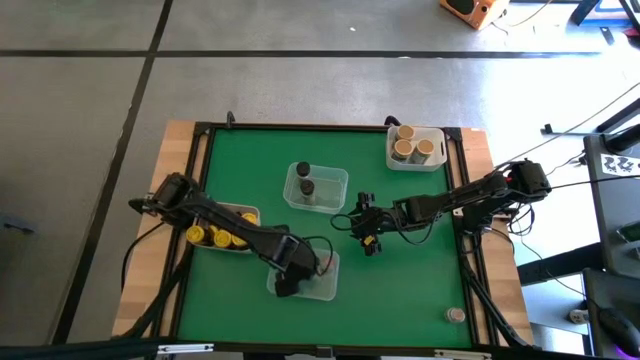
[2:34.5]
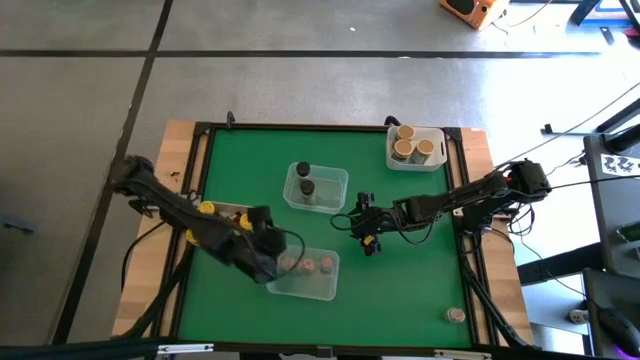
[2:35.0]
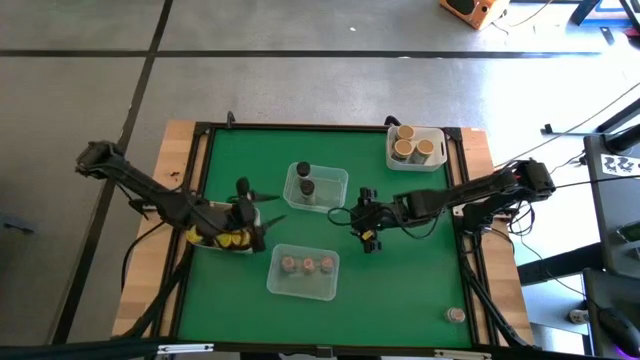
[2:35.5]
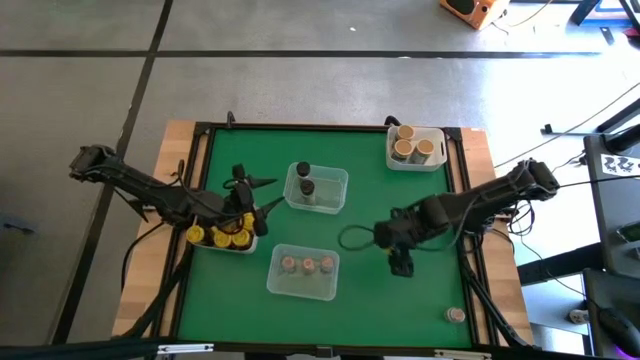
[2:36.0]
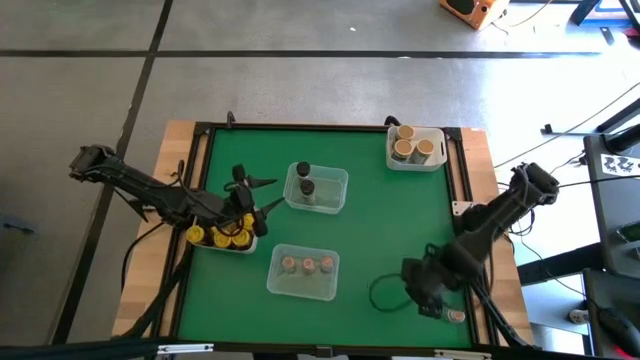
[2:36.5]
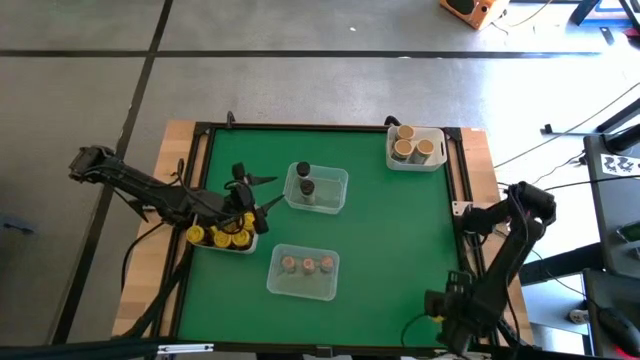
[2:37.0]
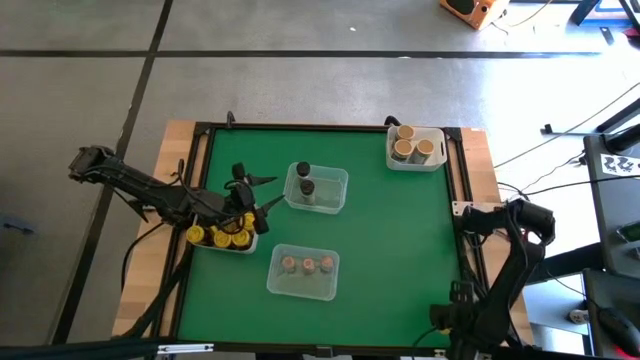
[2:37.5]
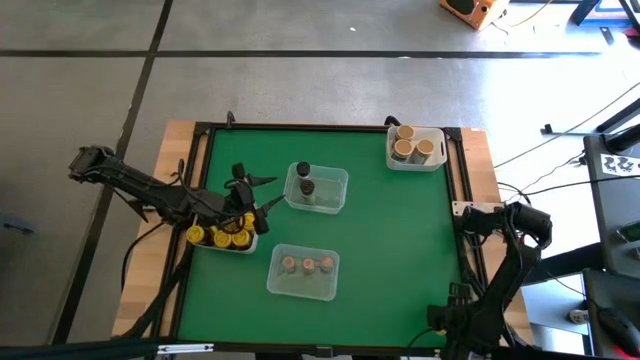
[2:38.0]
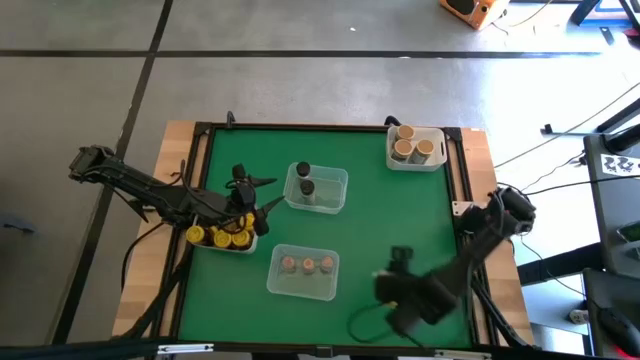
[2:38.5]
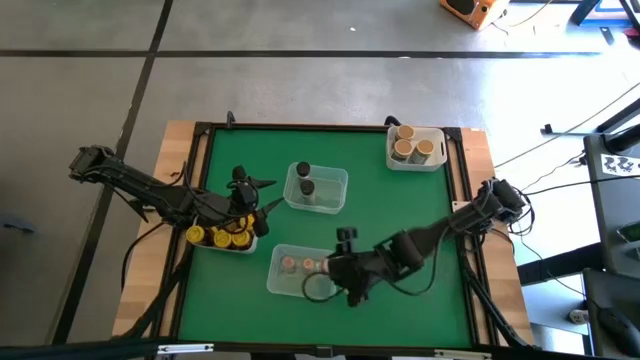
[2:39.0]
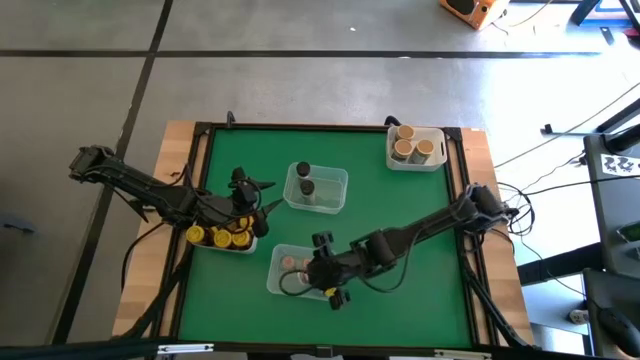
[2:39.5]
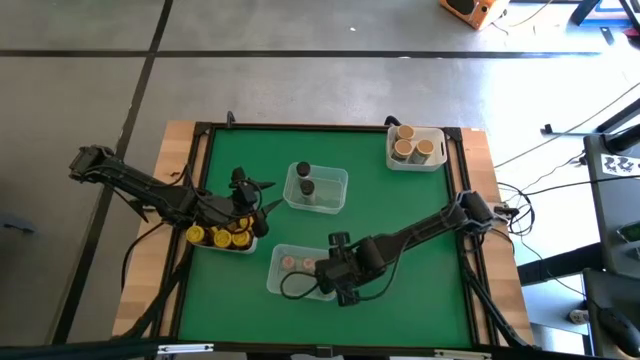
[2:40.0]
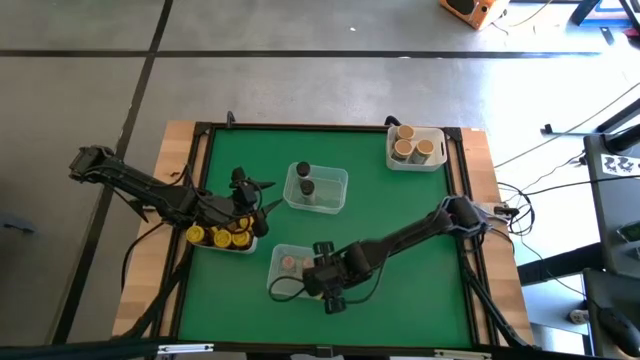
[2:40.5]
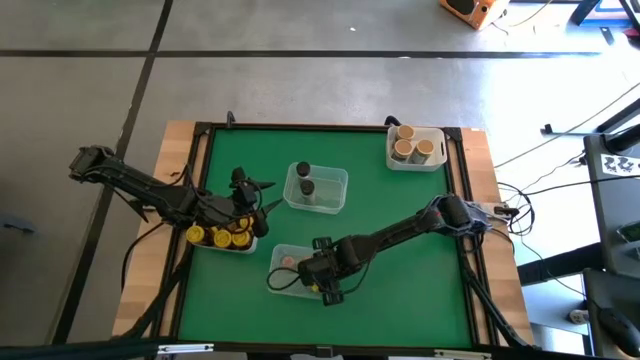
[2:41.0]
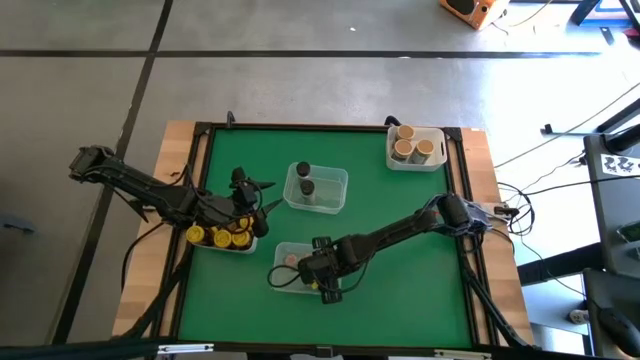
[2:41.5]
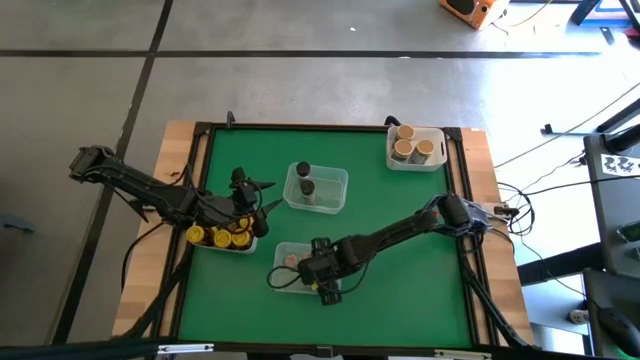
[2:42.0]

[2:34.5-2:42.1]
Task: Sort spices by type
Put the brown spice bottle into the bottom transparent bin

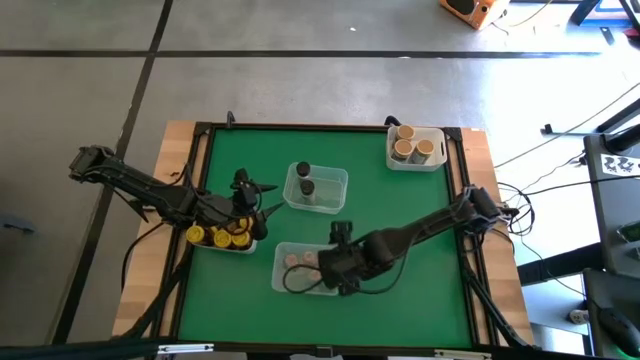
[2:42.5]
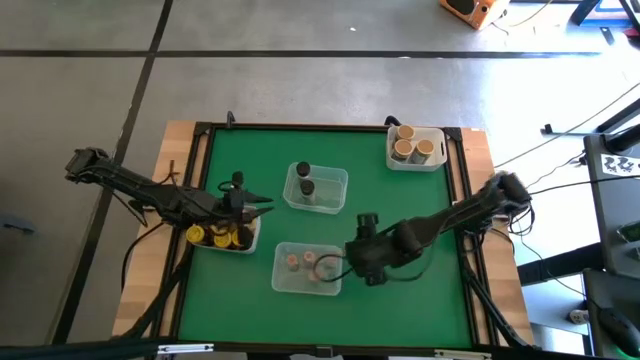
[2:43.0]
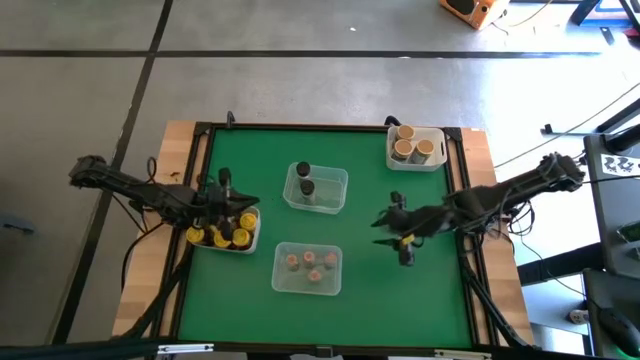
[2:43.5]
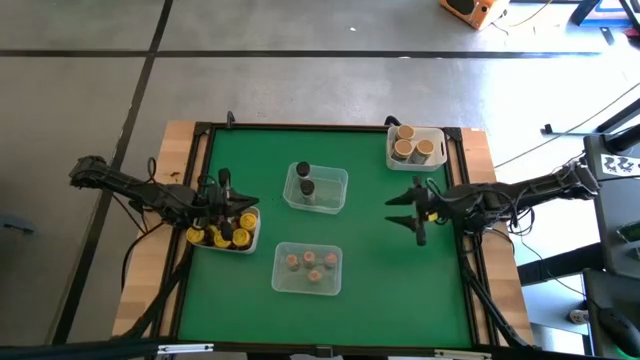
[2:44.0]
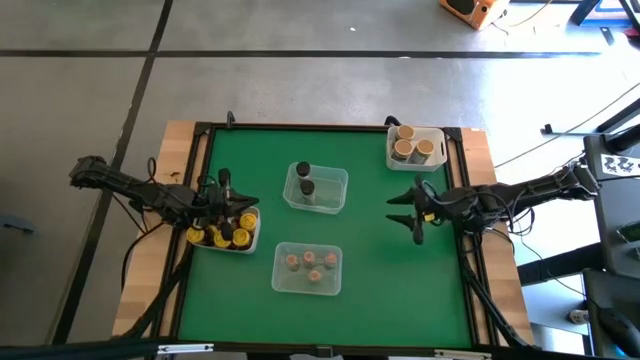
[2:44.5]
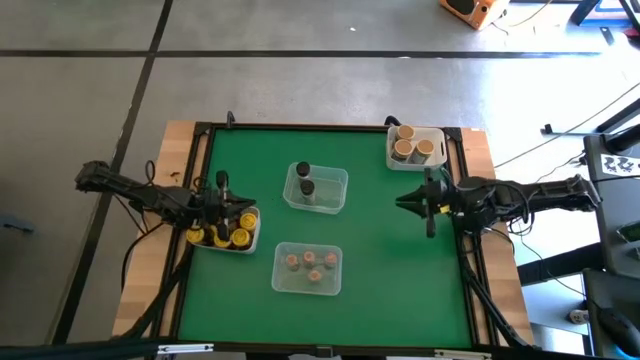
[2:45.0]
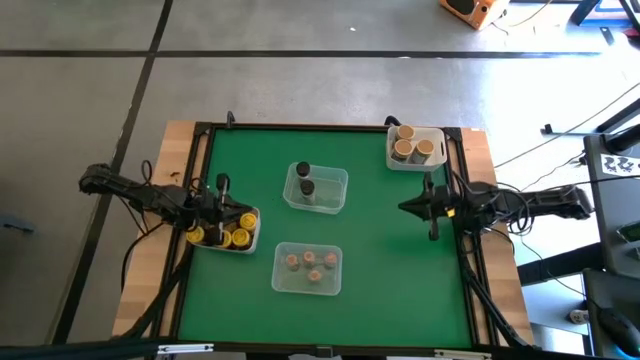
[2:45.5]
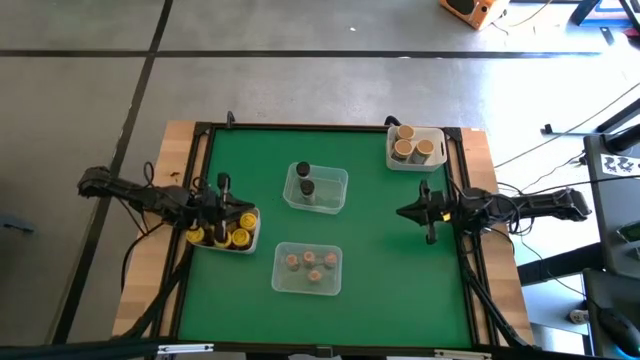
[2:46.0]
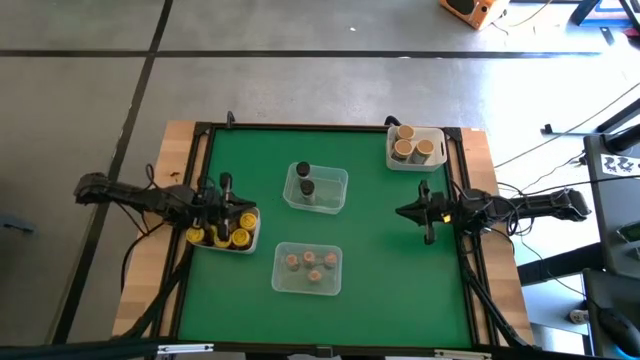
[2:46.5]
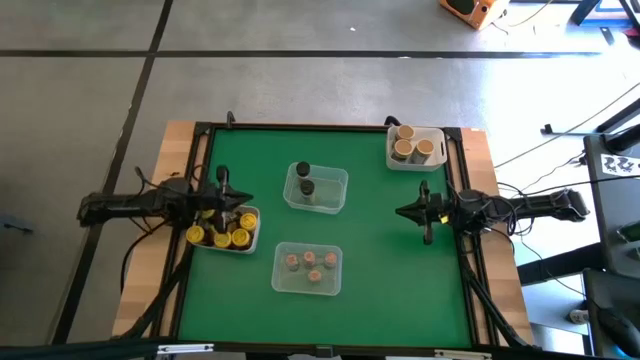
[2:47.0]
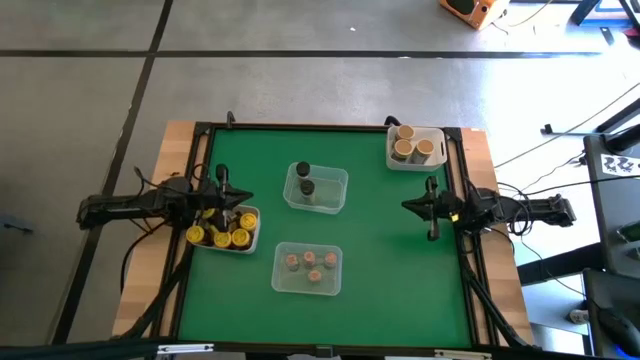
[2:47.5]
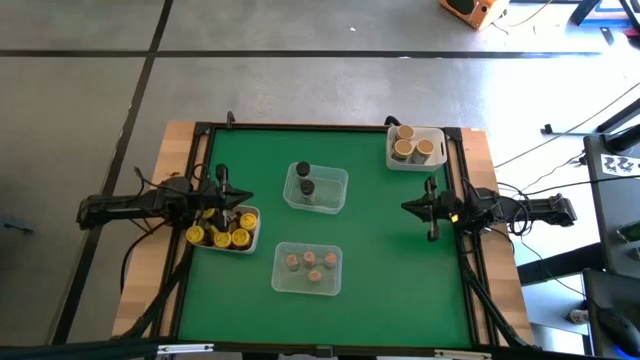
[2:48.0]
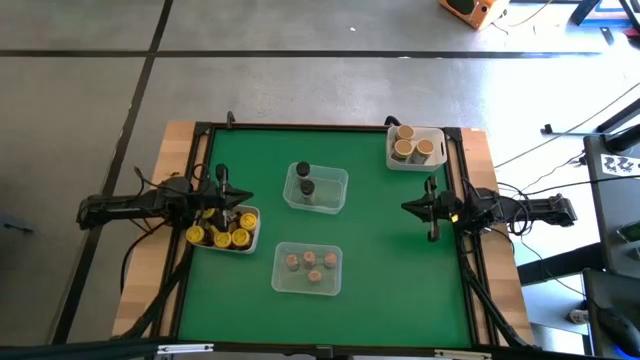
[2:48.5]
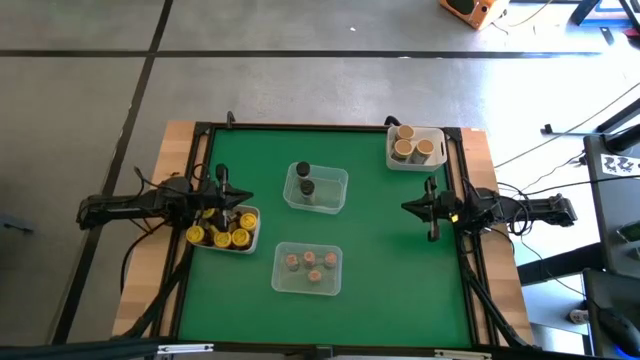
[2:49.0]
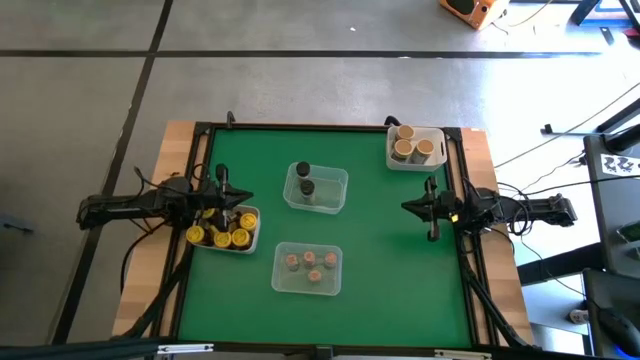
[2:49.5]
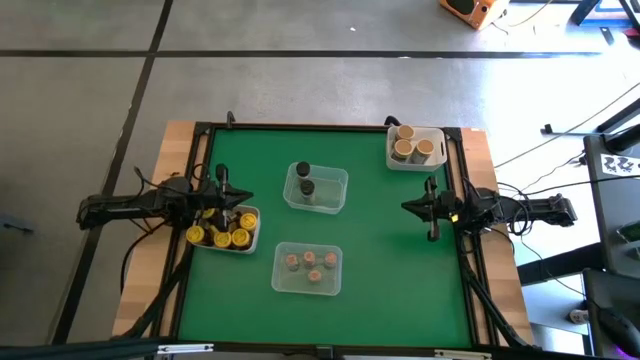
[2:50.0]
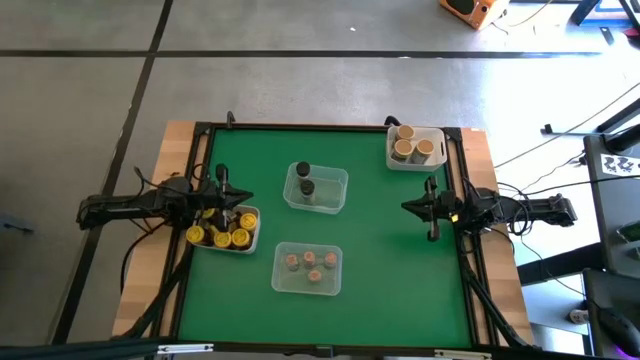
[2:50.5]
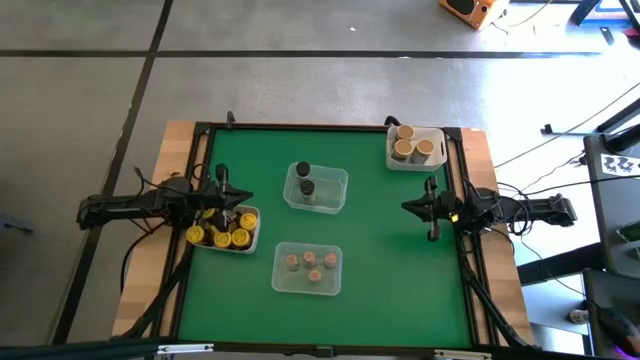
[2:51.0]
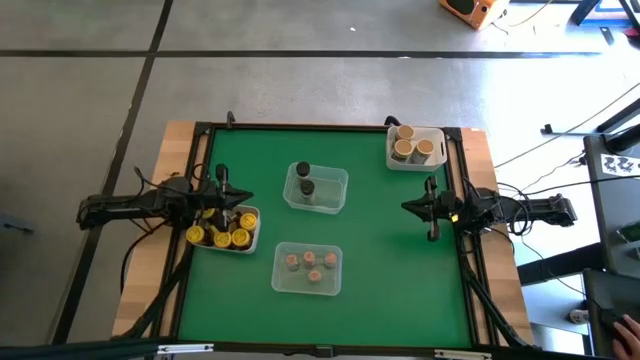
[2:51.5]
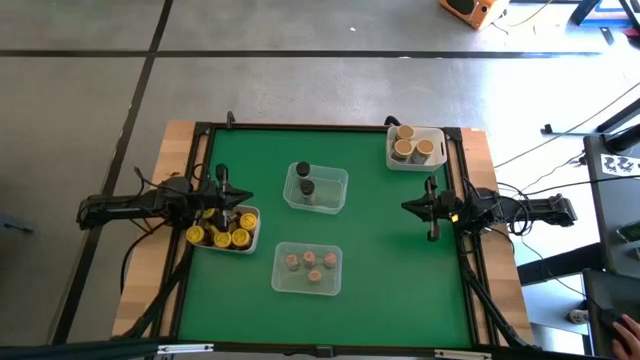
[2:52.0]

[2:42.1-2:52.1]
Return to home position

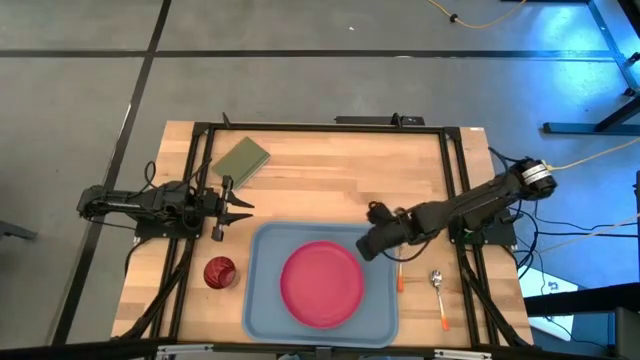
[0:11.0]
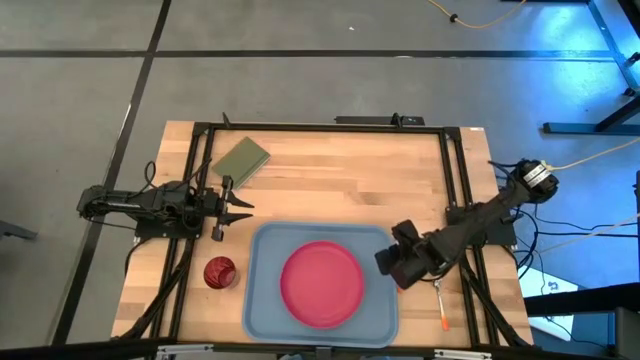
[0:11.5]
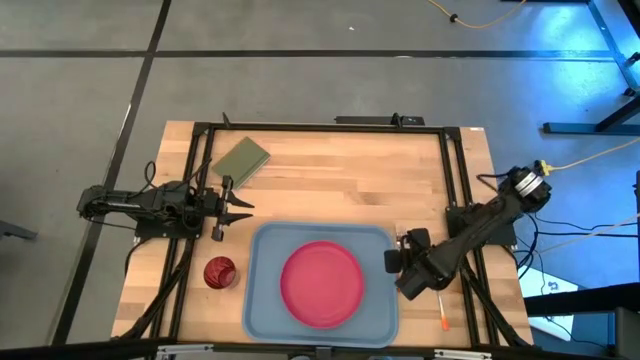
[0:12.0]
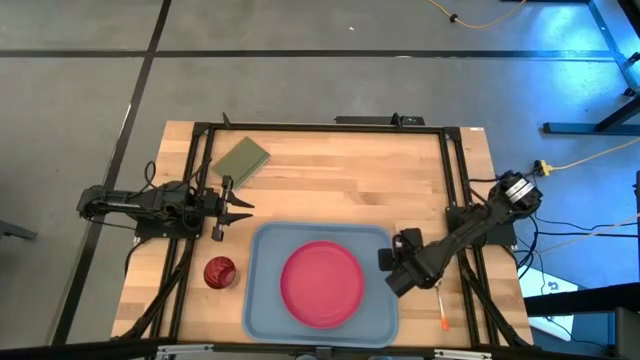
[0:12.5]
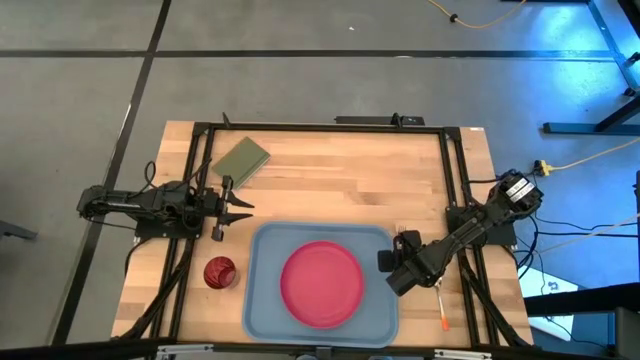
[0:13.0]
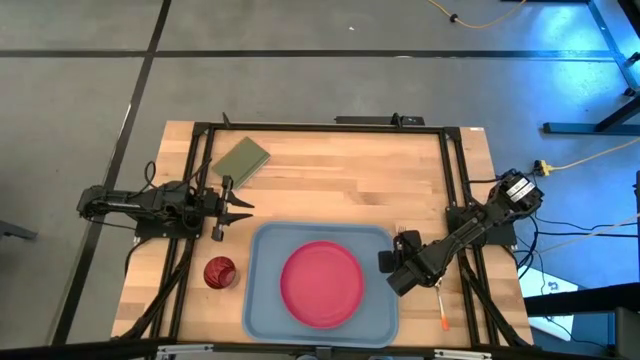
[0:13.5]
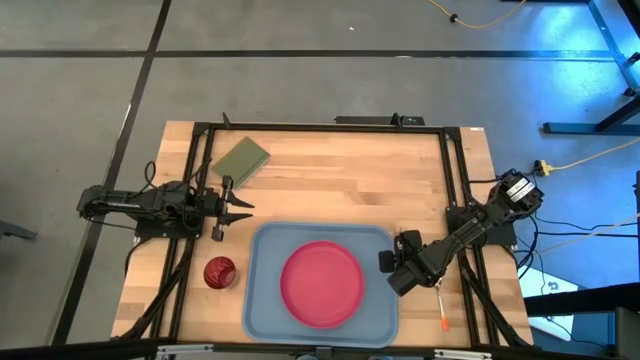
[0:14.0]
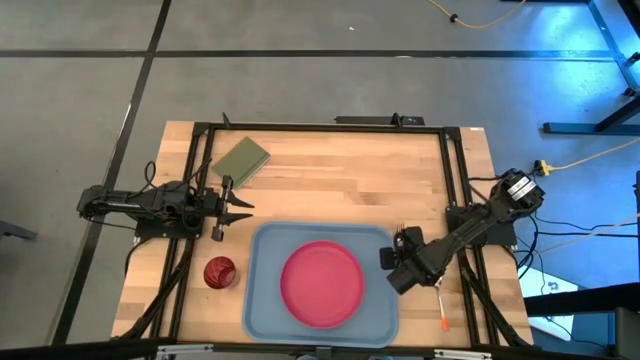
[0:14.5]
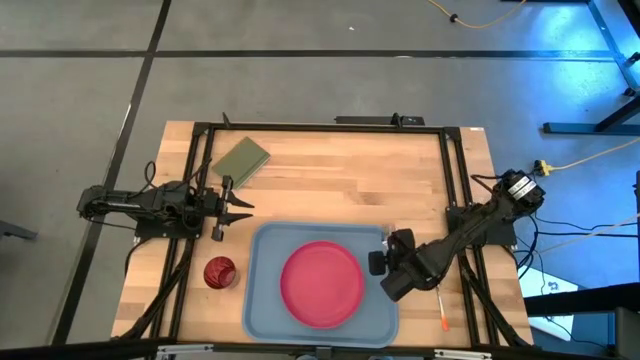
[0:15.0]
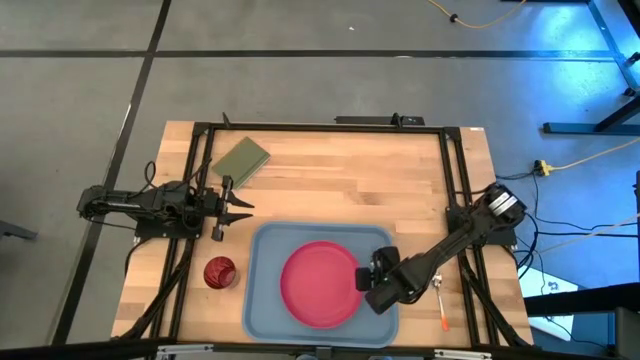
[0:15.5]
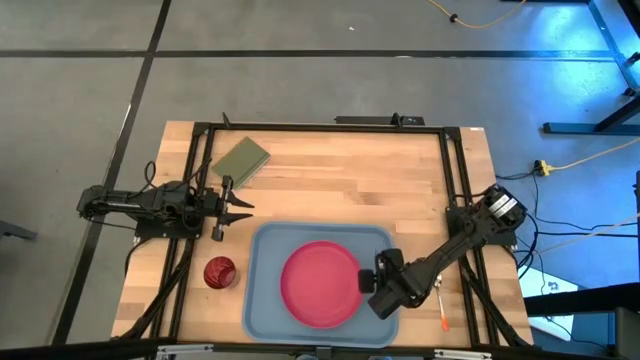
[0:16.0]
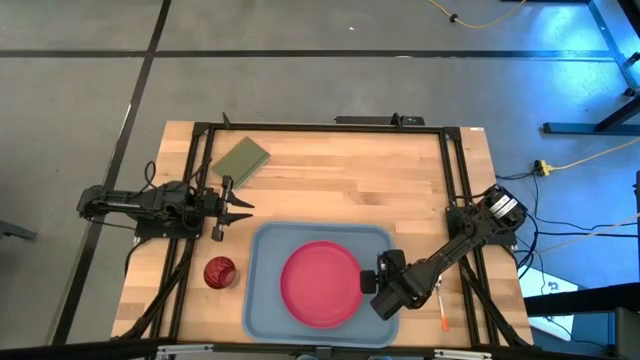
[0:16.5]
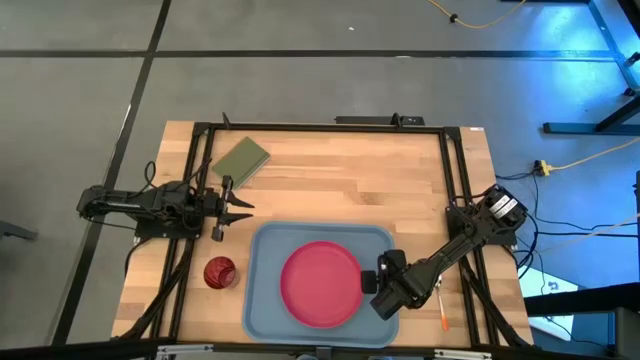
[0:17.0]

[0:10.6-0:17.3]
Task: Pick and place plate/cup/fork/spoon on tray
Put the orange fork on the blue tray to the right side of the pink plate
